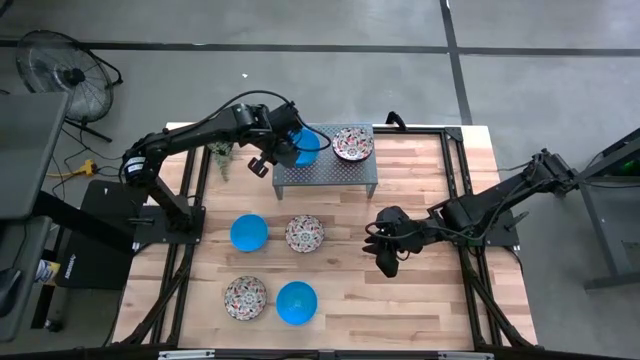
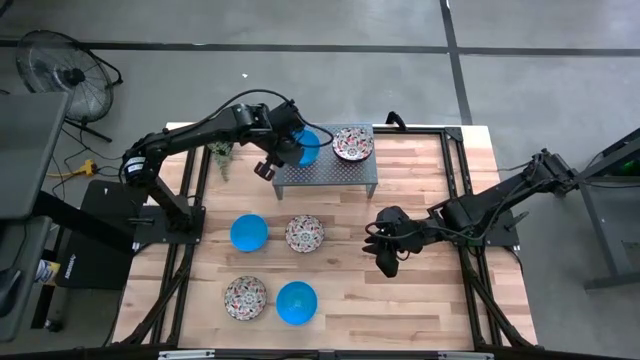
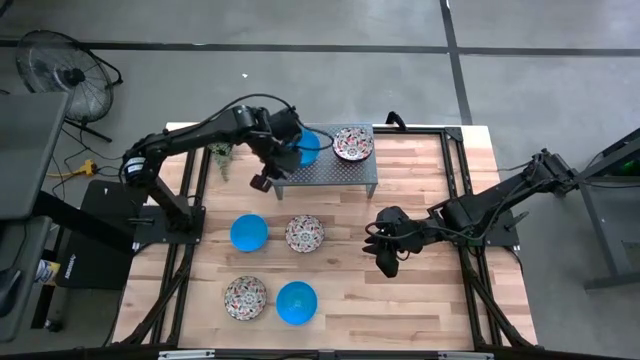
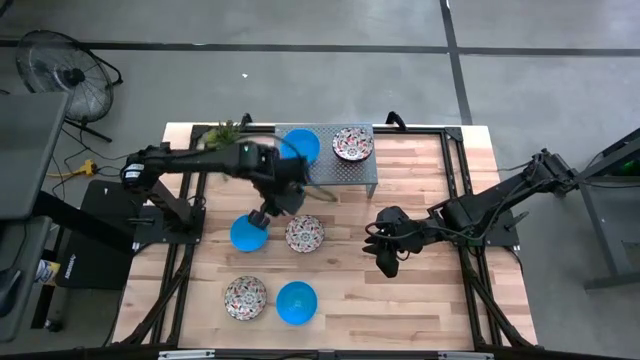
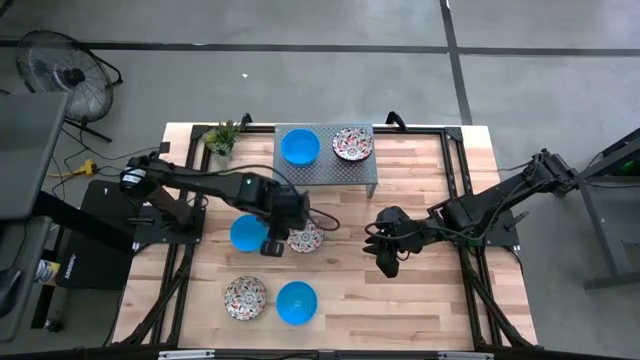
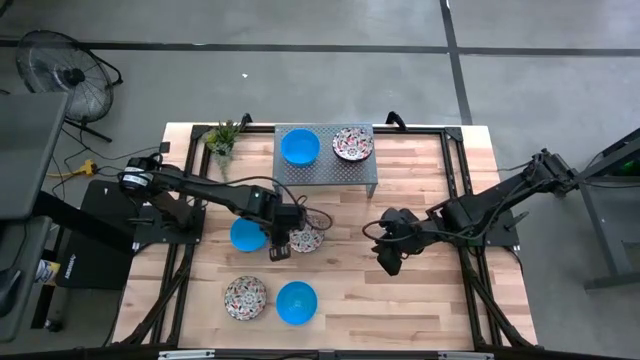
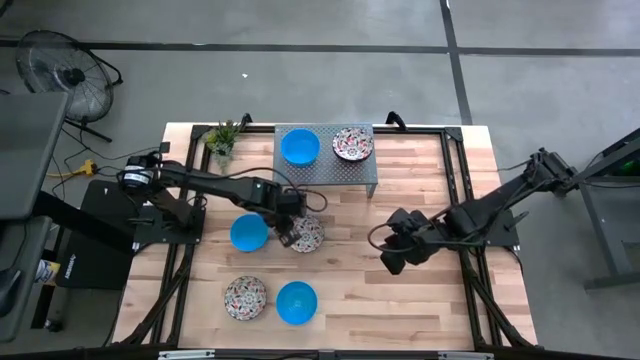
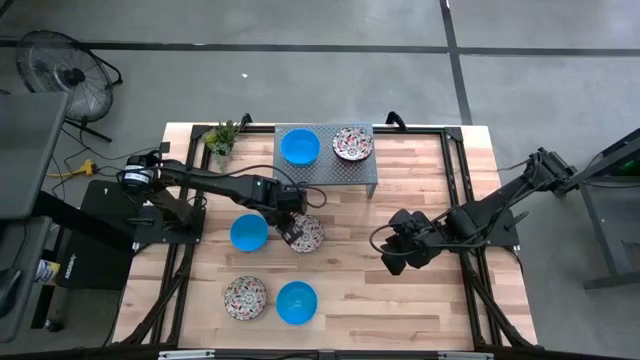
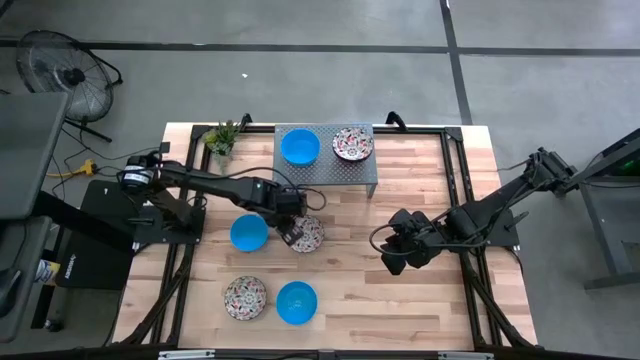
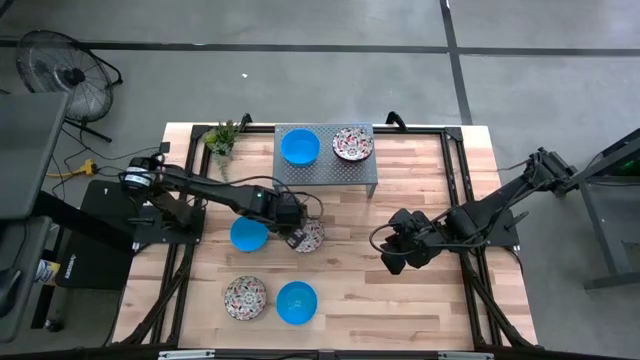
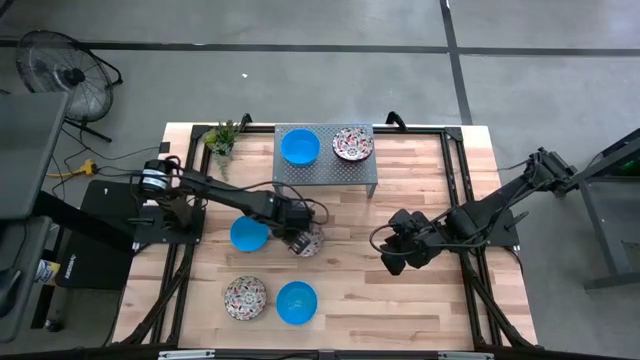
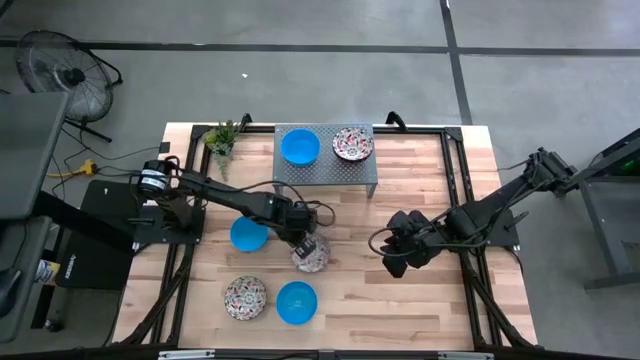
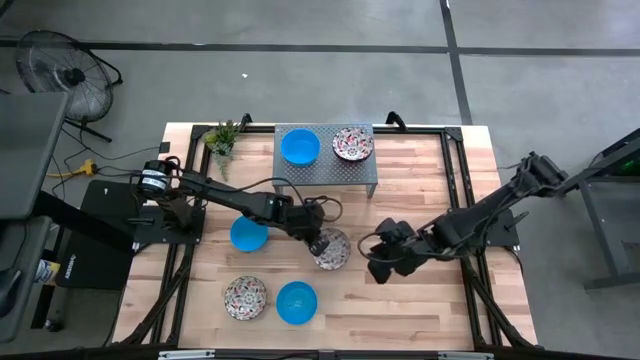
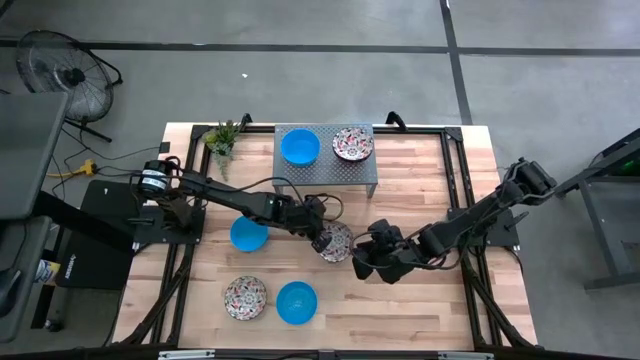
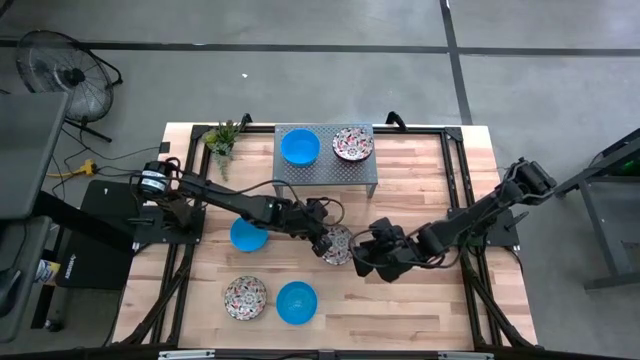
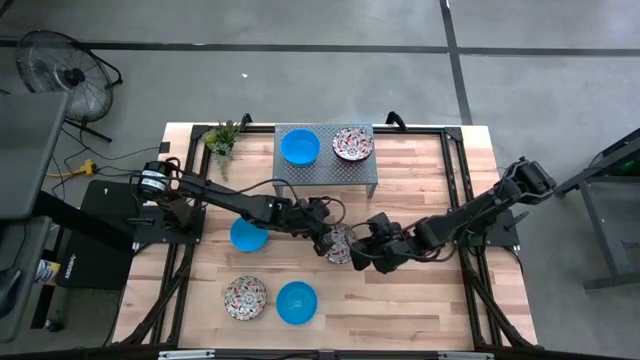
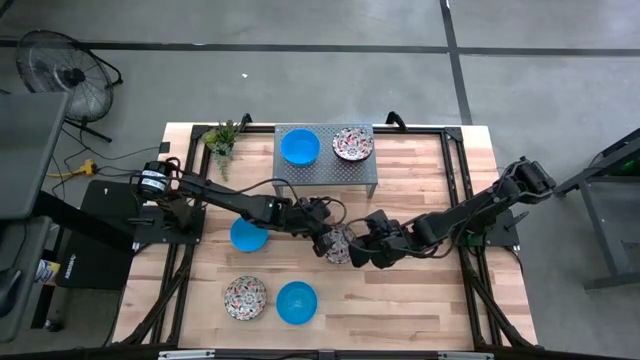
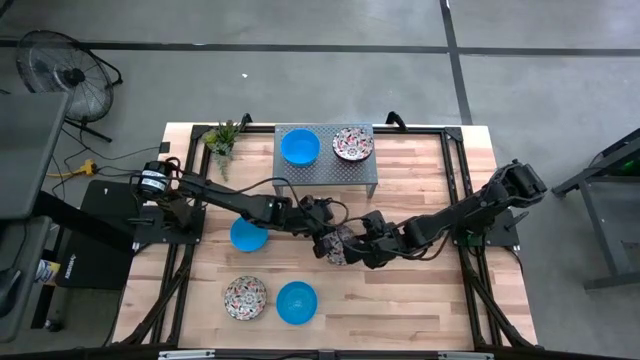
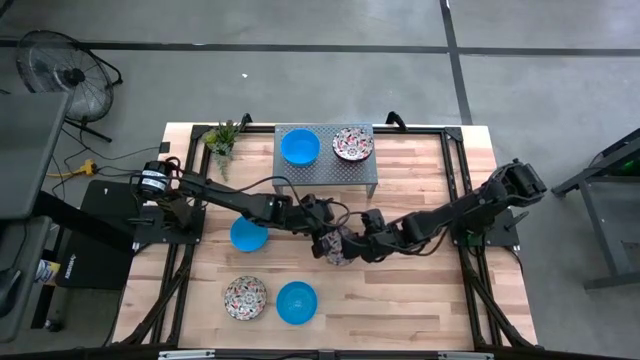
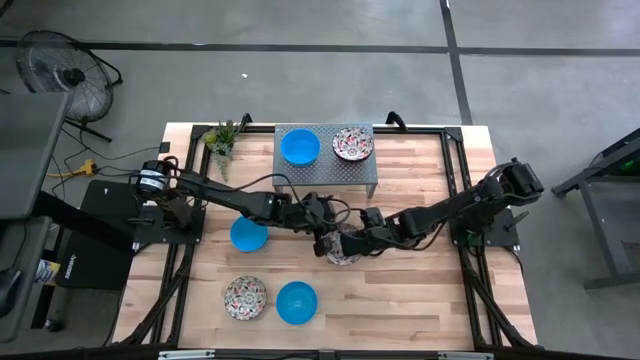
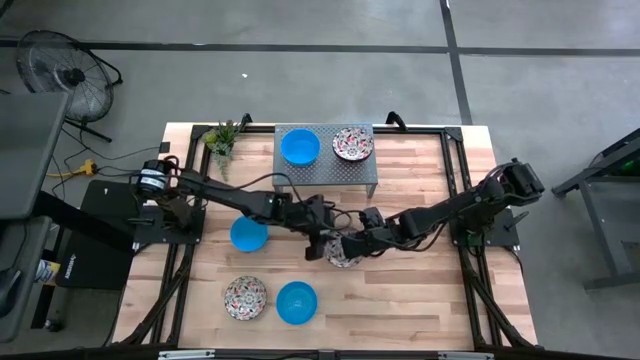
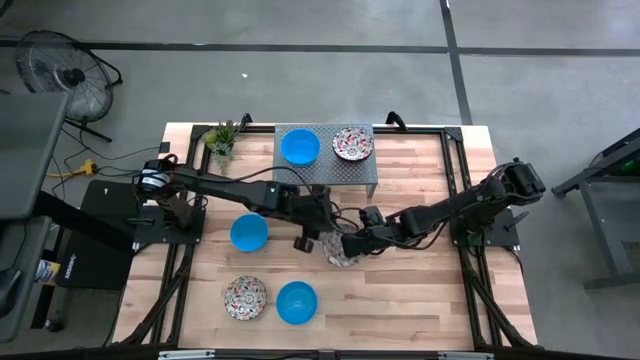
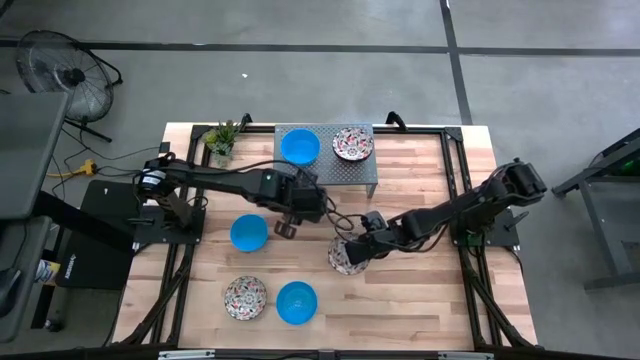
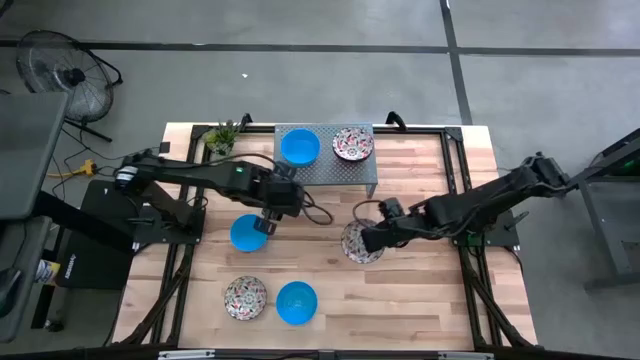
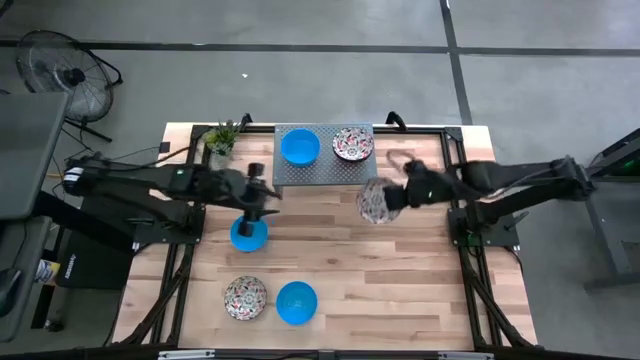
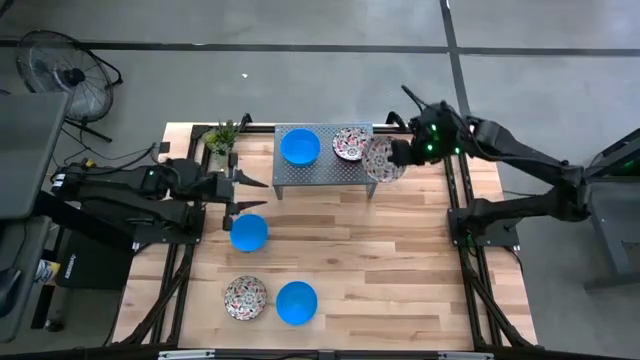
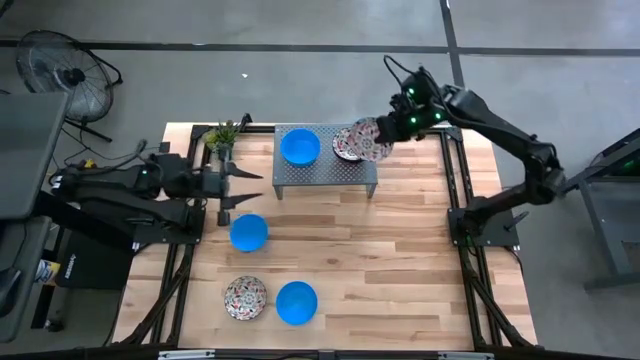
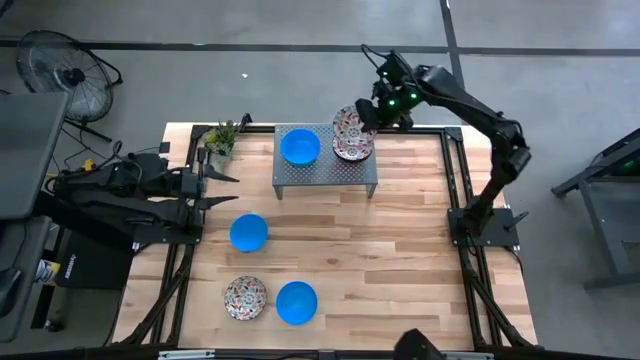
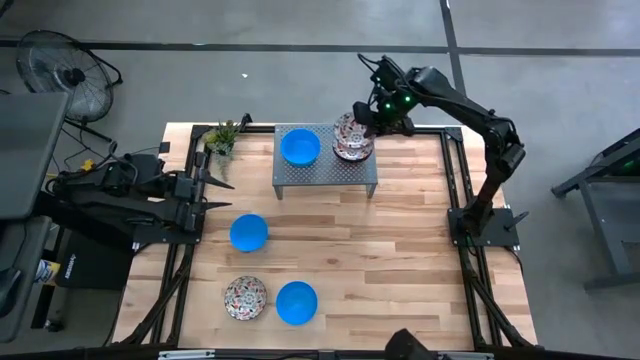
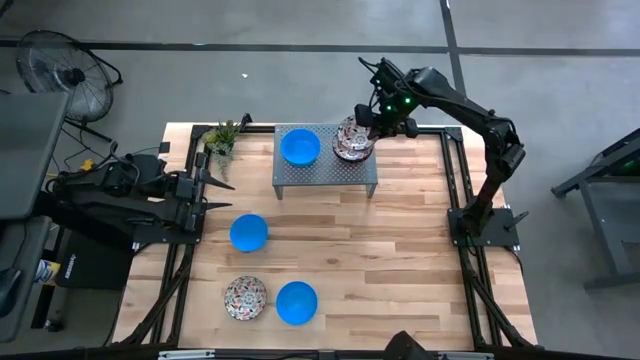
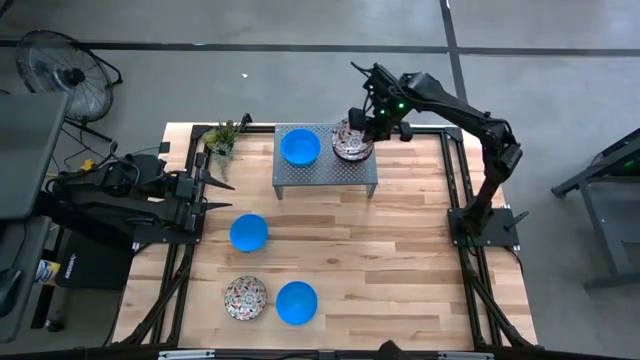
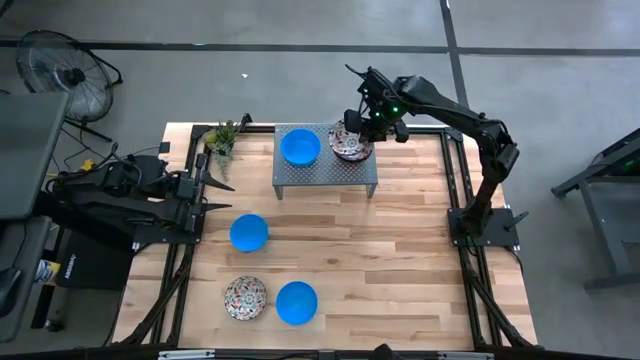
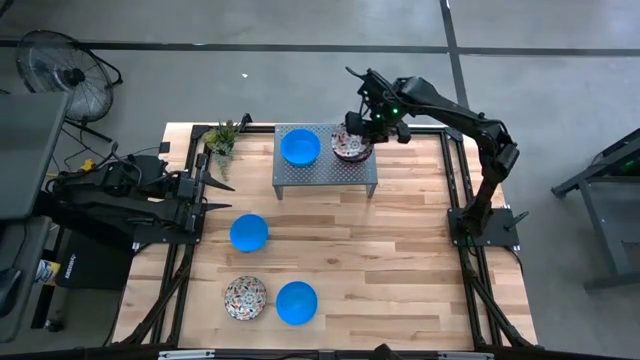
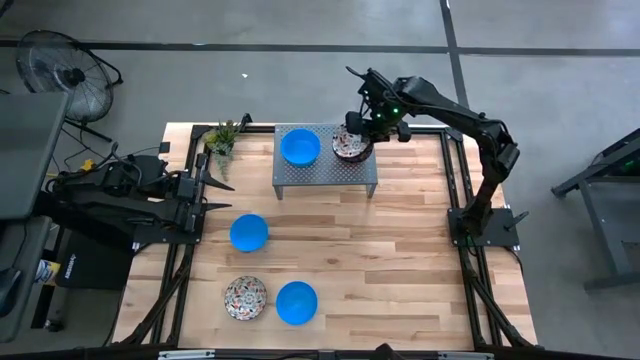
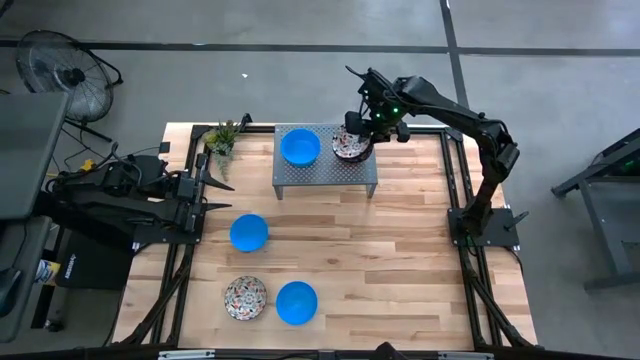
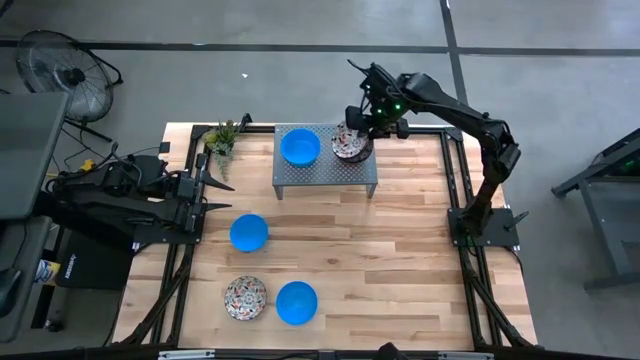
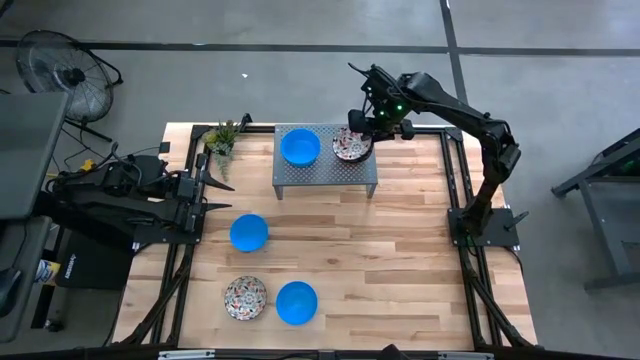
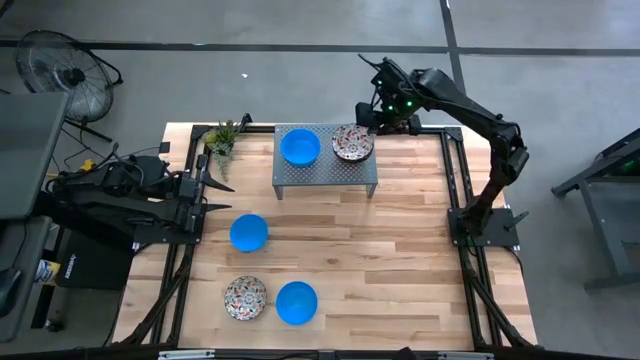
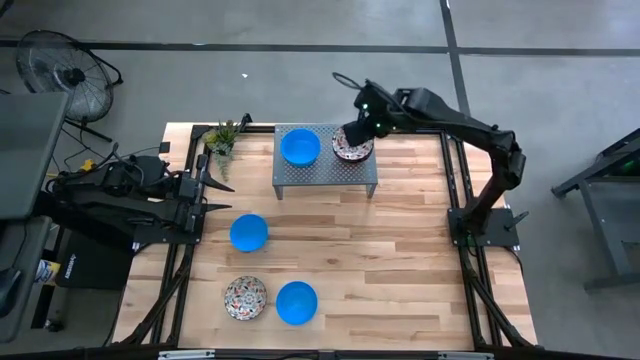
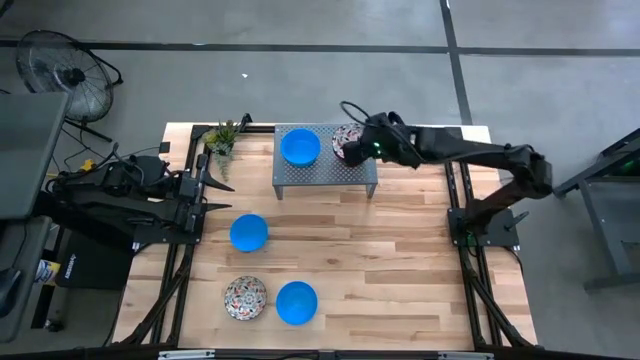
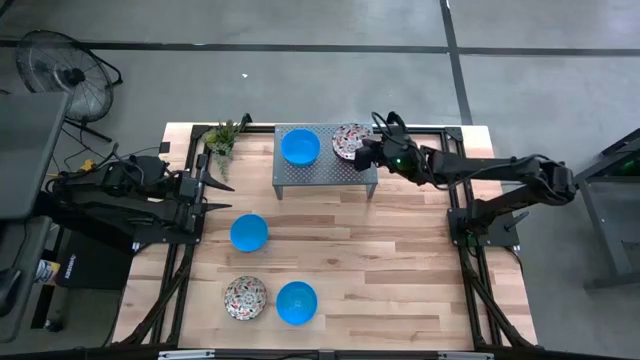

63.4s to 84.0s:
Task: Pick & Place Mini bowls
Stack the white patterned bowl on top of the other white patterned bowls on the shelf

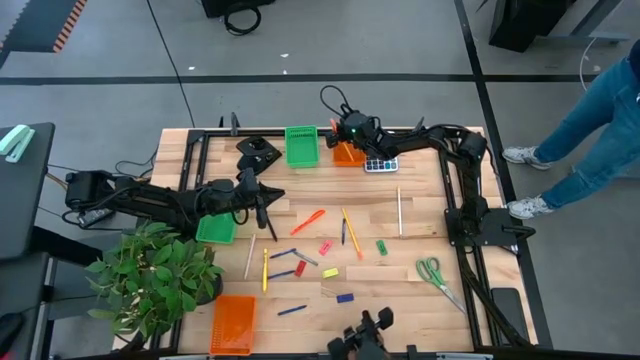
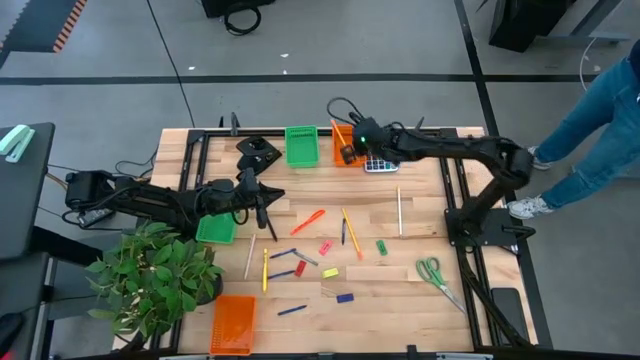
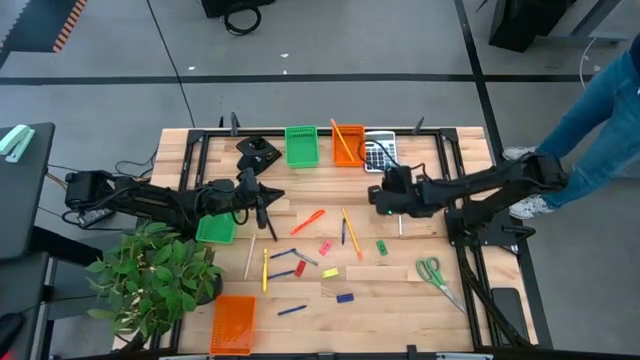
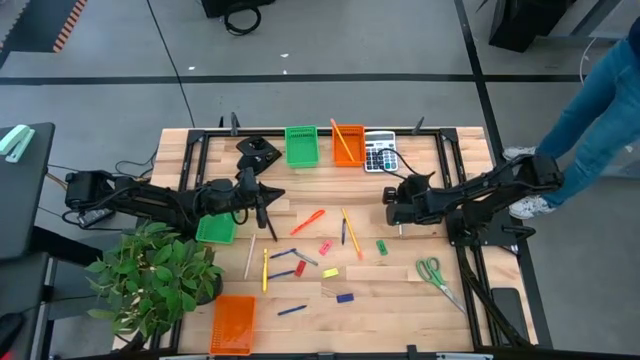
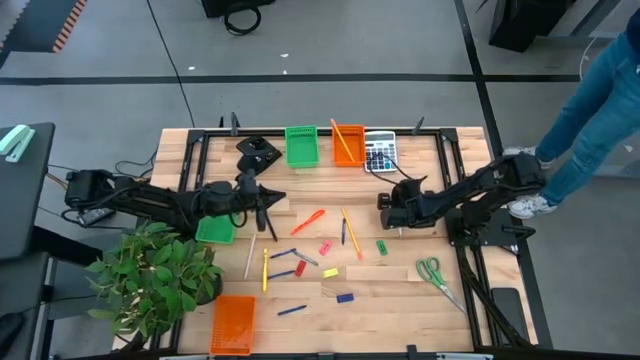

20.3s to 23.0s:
Task: Sort crayons/erasers/pens/pencils in bins
Put the white pencil into the top orange bin
